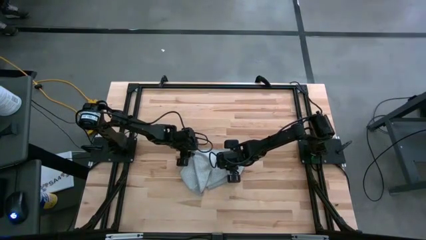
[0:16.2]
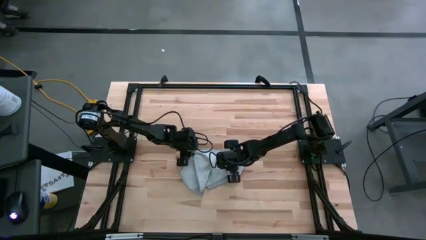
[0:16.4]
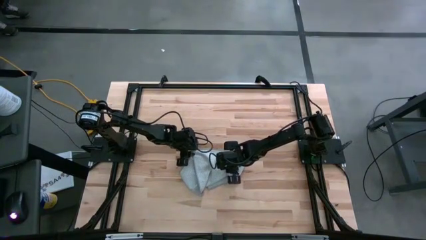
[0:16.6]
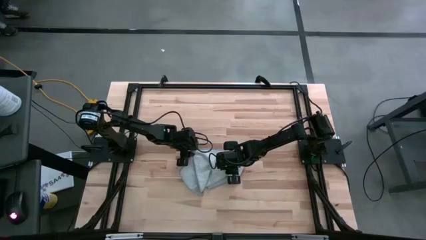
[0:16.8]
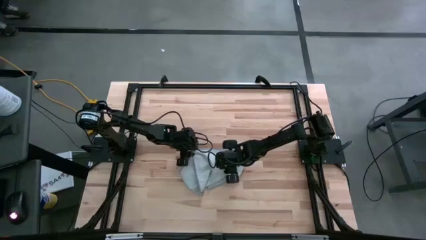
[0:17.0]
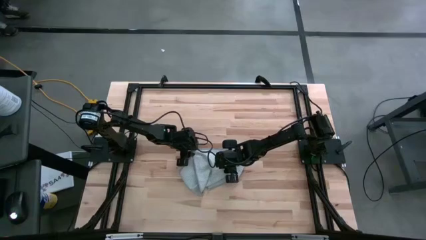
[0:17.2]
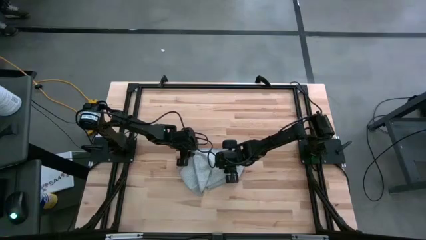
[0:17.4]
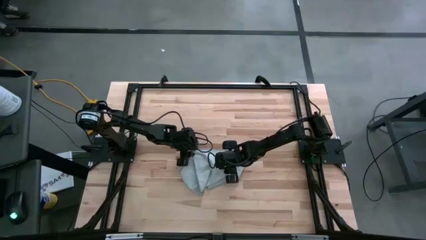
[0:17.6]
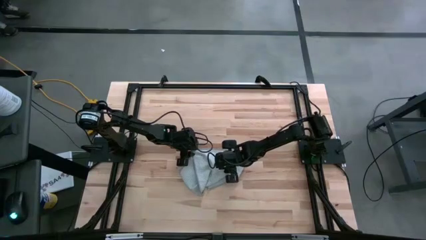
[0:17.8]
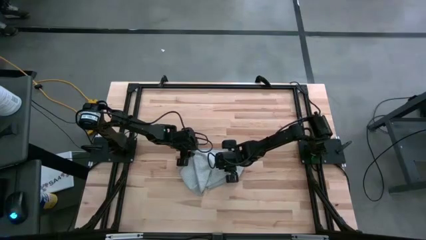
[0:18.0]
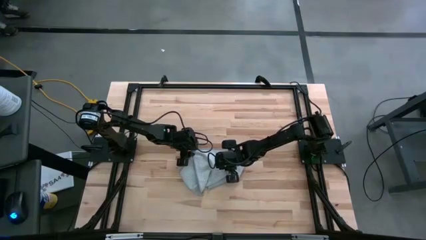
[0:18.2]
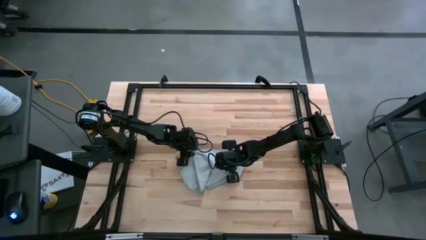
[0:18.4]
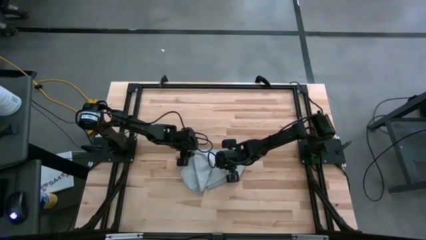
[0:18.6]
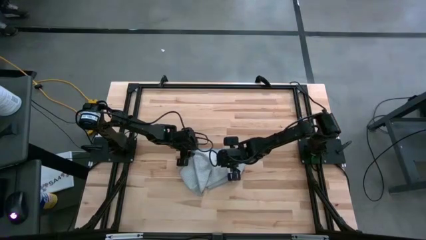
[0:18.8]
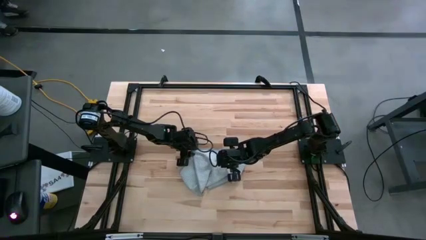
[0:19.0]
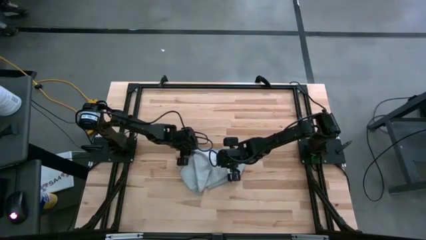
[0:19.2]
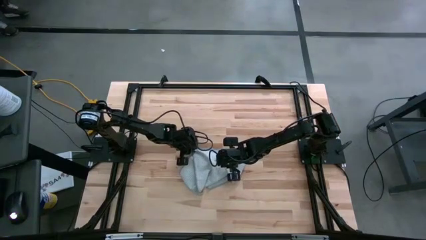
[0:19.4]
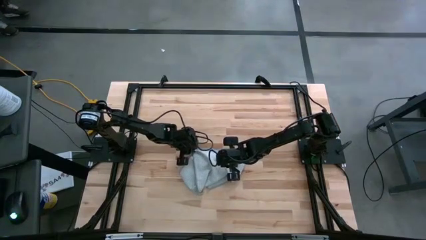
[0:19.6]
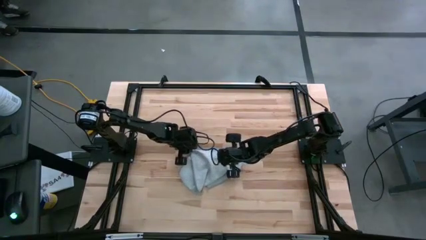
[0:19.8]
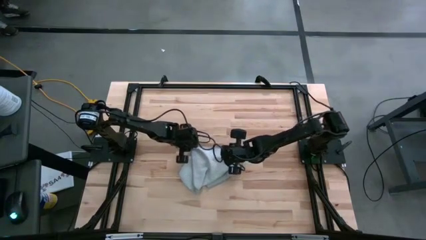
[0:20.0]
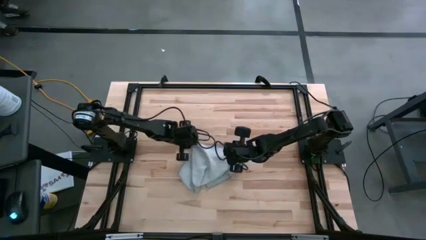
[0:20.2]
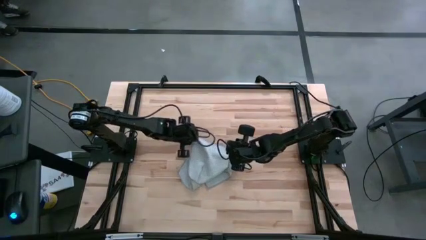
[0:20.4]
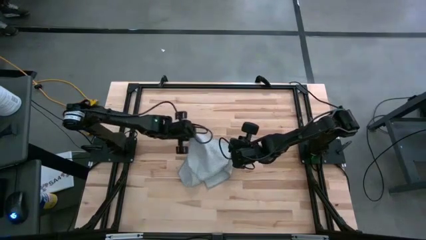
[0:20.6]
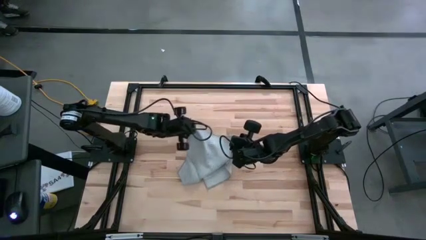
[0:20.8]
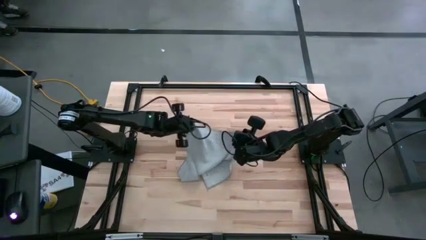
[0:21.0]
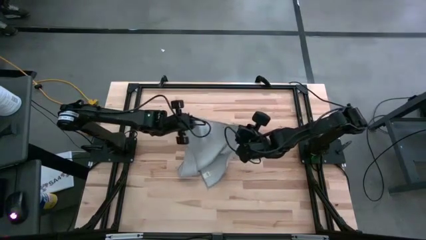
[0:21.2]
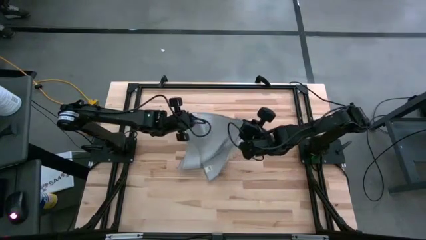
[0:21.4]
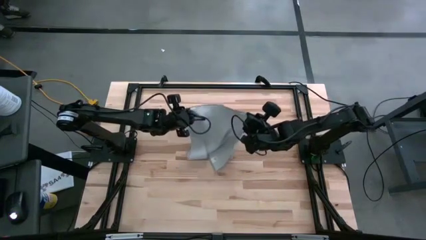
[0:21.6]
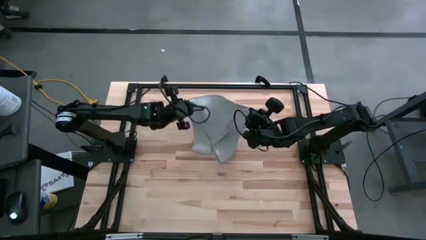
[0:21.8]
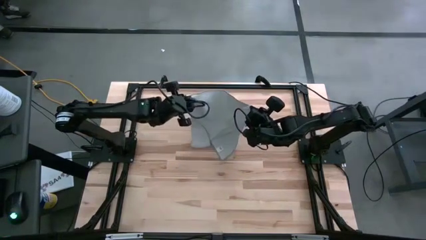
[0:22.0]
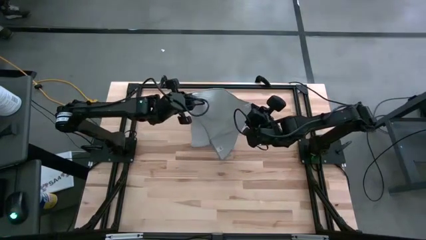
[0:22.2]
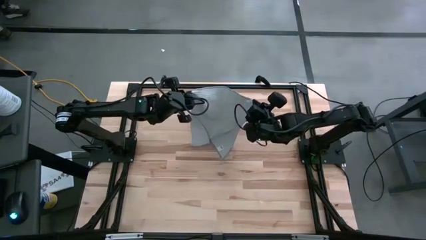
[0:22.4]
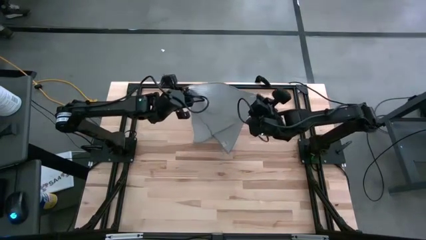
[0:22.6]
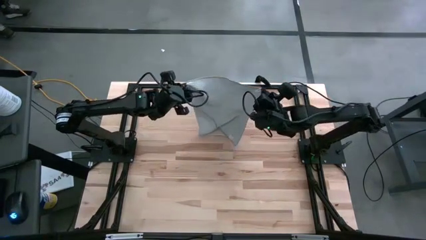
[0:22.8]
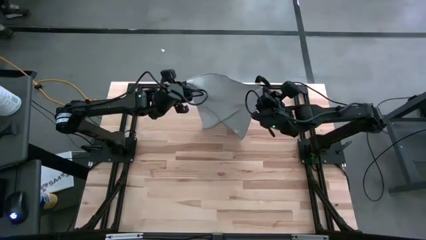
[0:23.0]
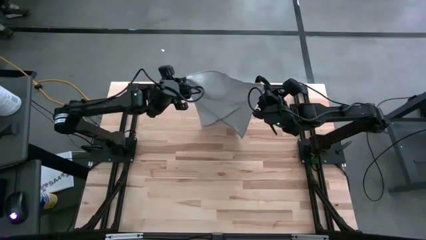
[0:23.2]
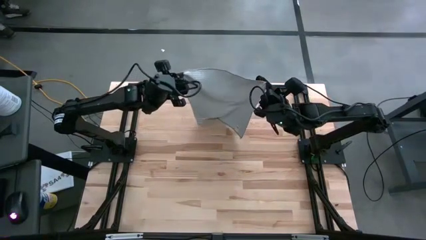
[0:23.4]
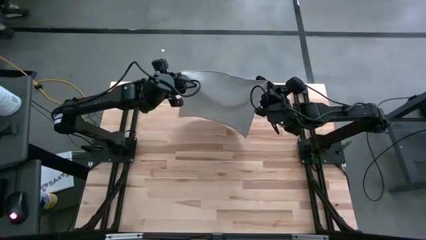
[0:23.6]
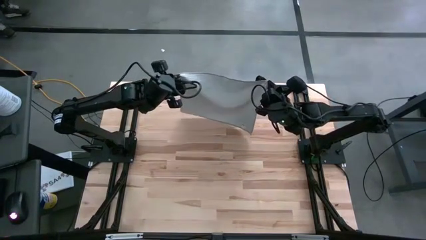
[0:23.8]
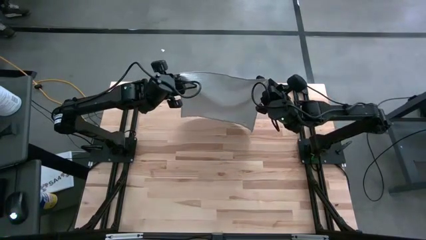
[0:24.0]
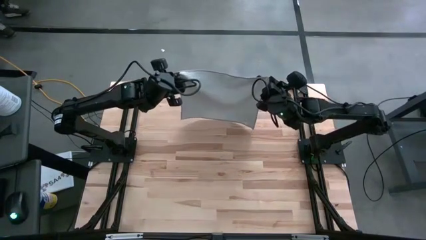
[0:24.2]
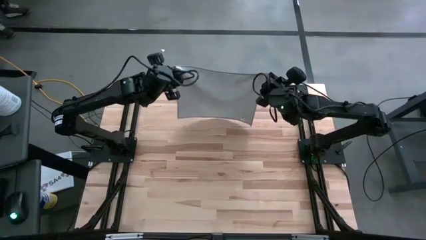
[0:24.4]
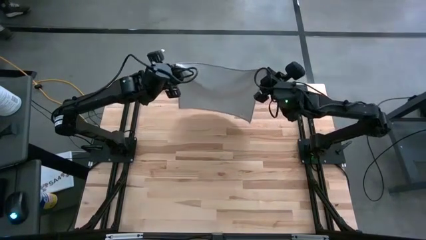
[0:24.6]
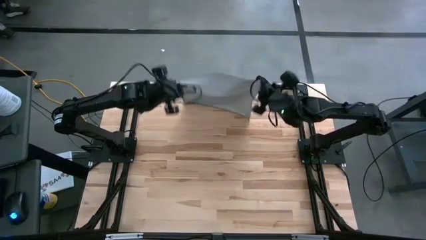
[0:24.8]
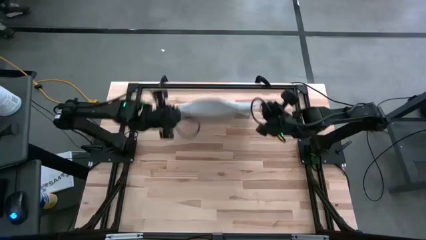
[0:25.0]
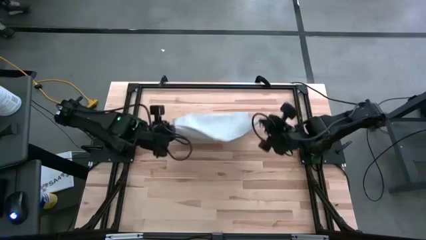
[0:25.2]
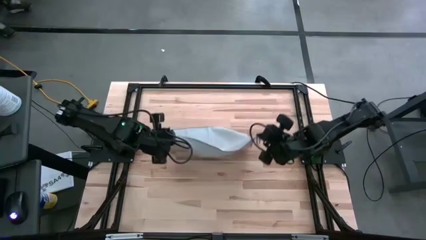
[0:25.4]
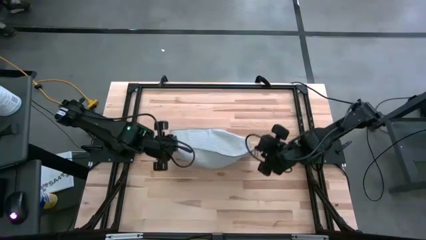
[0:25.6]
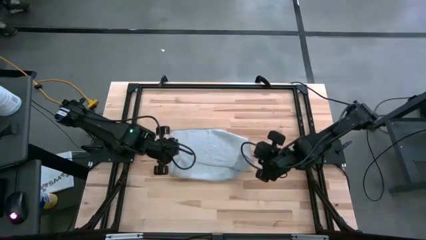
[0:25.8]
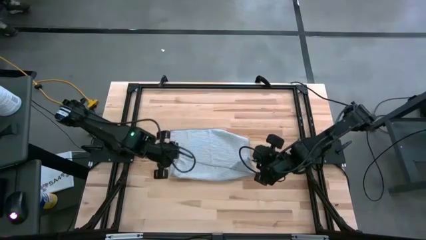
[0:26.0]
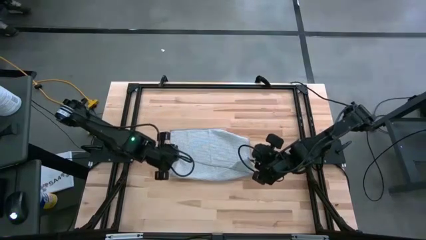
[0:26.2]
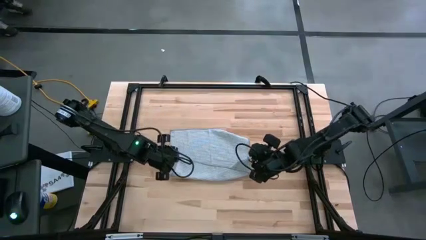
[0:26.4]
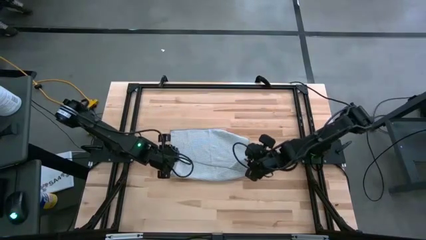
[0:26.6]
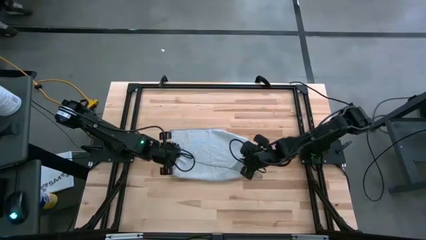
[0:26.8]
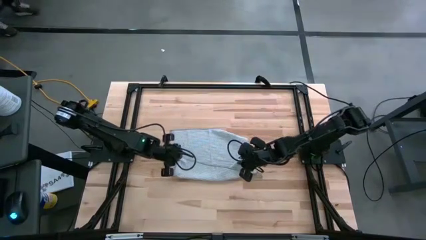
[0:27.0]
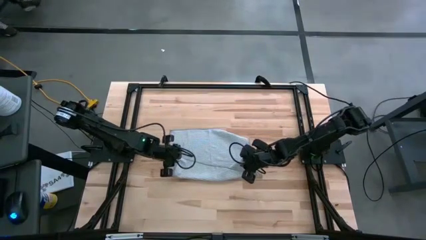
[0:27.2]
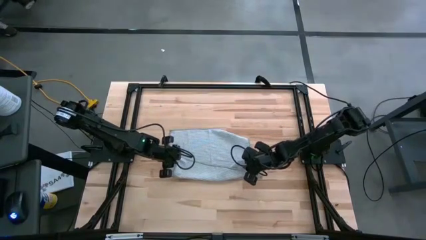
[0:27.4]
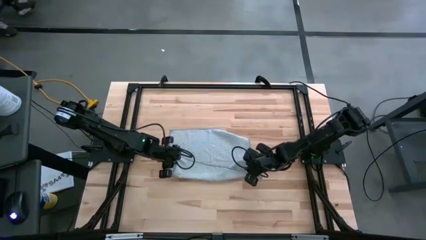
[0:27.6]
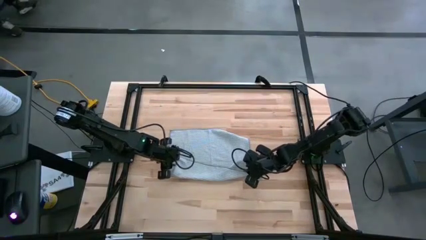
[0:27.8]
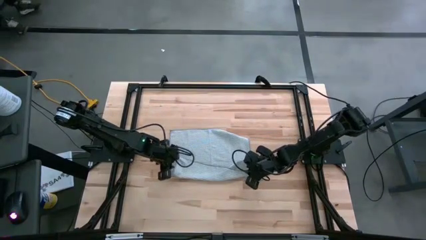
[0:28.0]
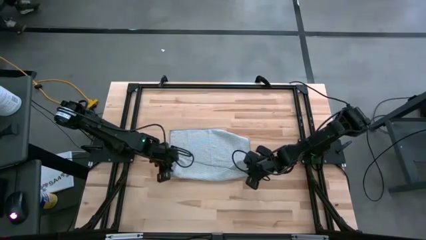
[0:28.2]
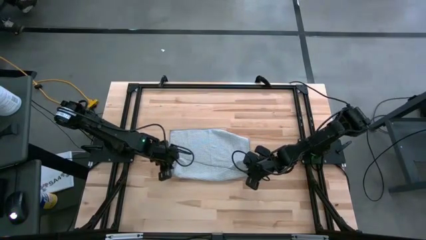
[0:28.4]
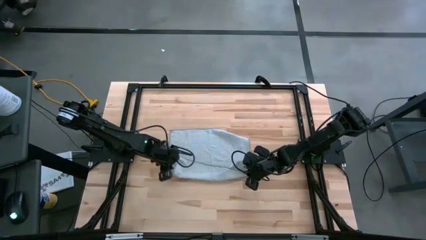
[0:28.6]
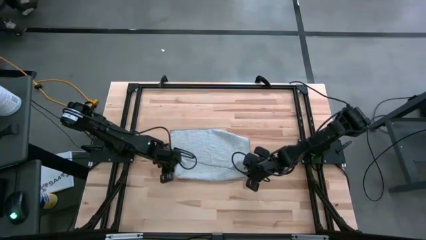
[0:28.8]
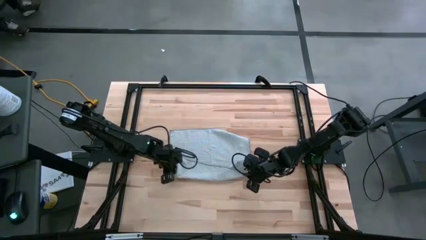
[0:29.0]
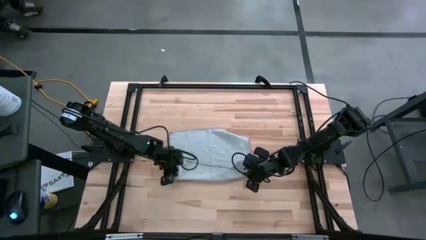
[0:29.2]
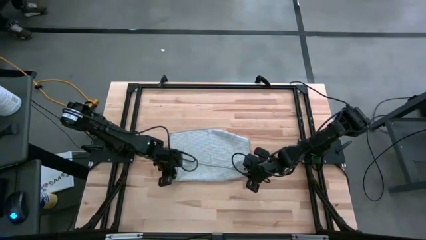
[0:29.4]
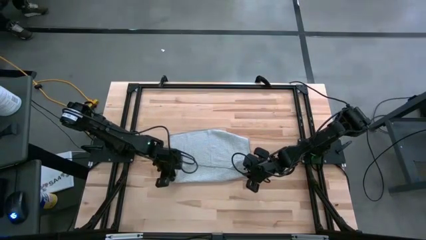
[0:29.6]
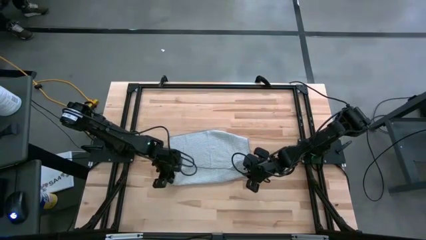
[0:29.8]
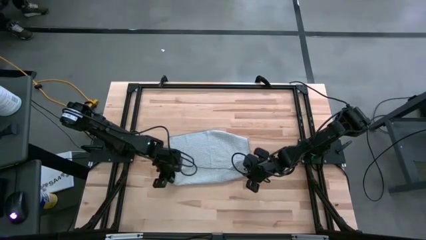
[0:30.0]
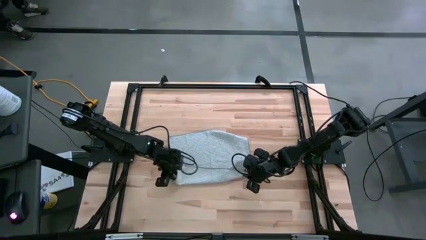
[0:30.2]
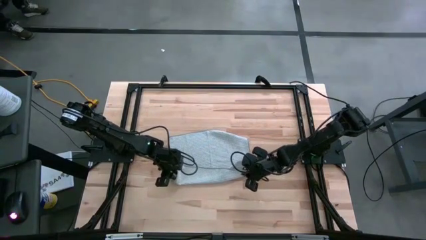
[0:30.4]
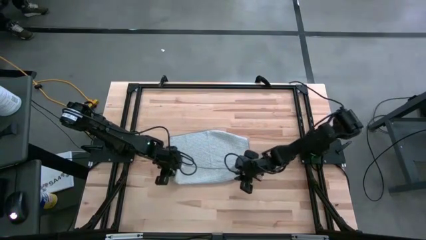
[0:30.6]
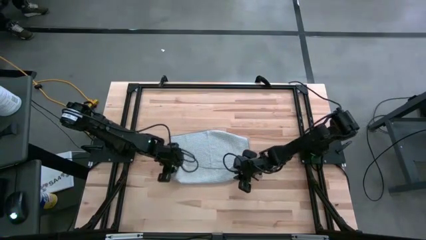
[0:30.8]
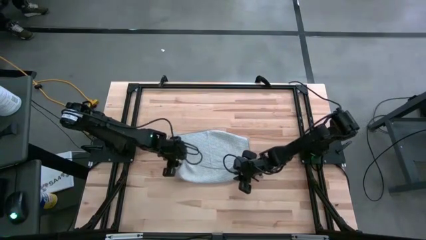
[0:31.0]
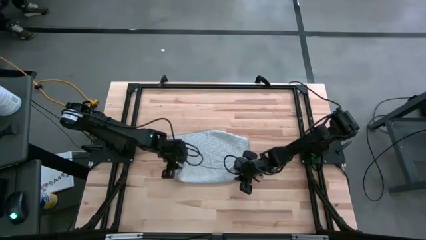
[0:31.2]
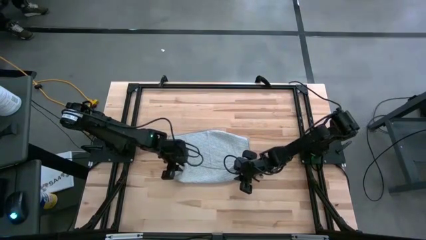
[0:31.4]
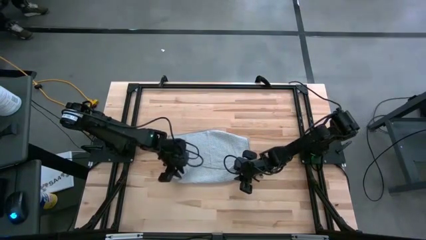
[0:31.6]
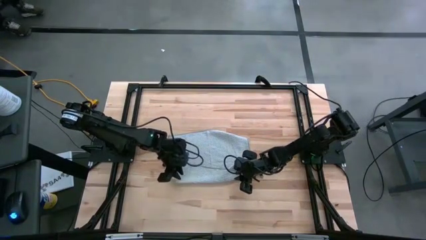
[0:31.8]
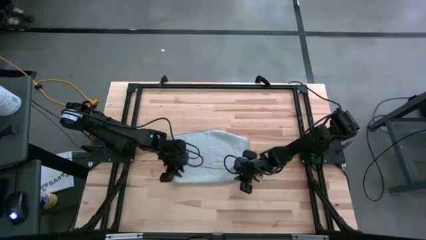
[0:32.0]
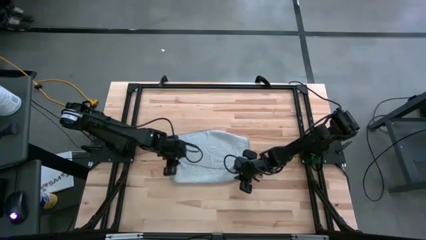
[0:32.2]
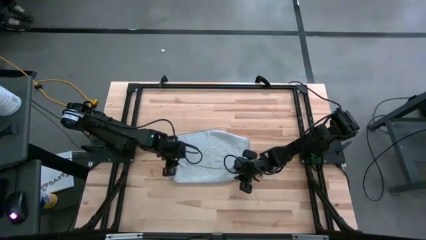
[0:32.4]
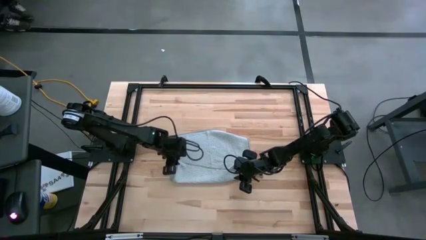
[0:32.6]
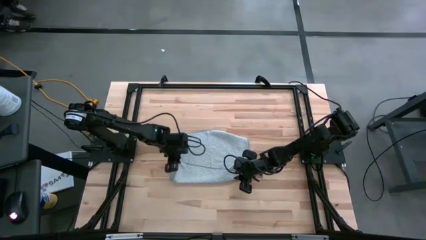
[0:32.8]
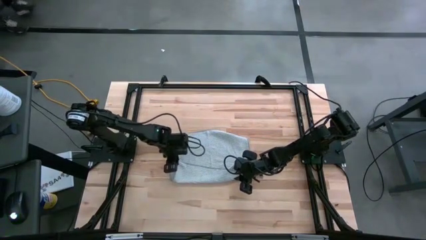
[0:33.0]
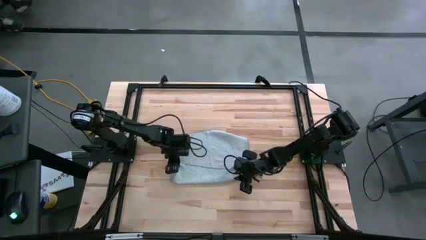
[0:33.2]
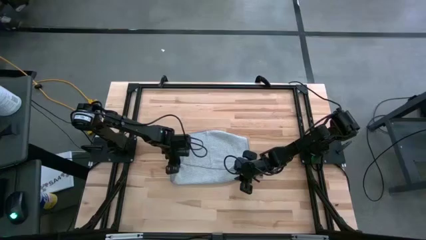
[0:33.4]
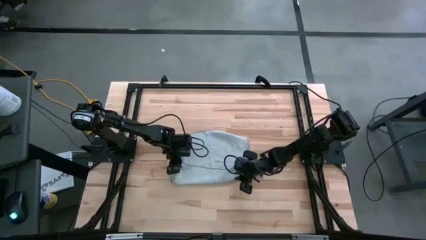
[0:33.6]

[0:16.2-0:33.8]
Task: Fold microfiber towels
Fold the gray microfiber towel
